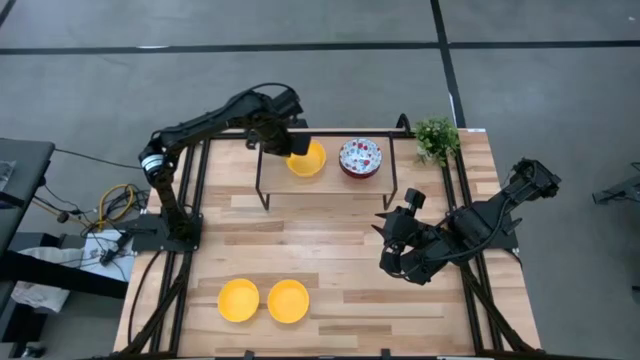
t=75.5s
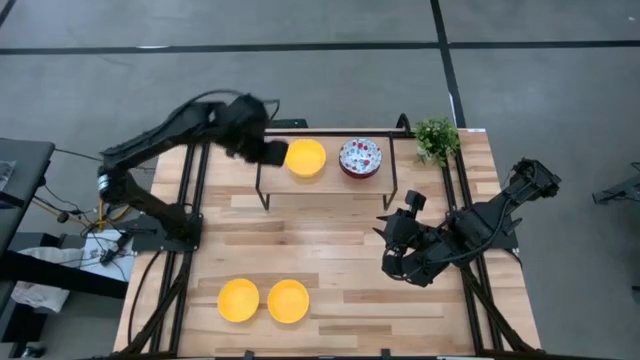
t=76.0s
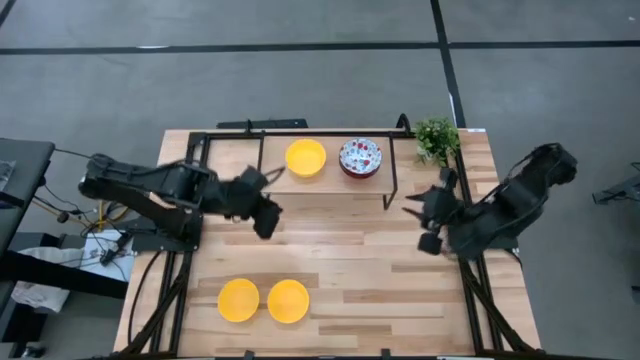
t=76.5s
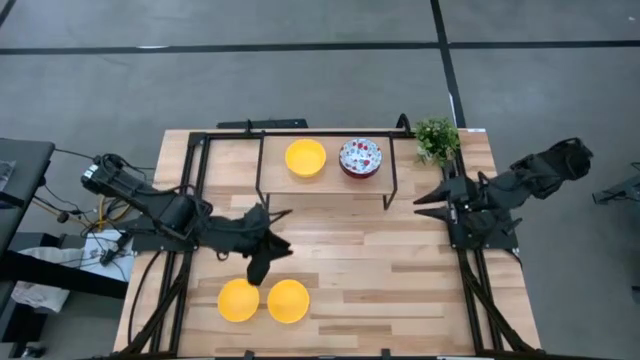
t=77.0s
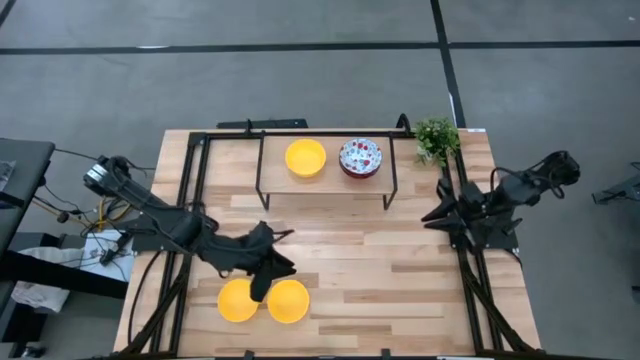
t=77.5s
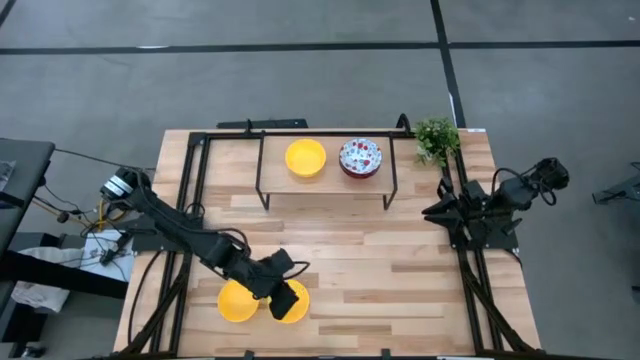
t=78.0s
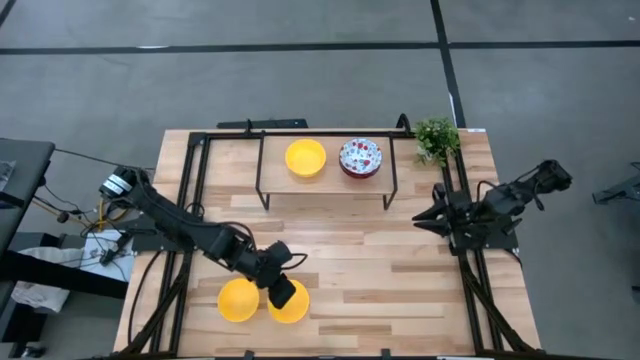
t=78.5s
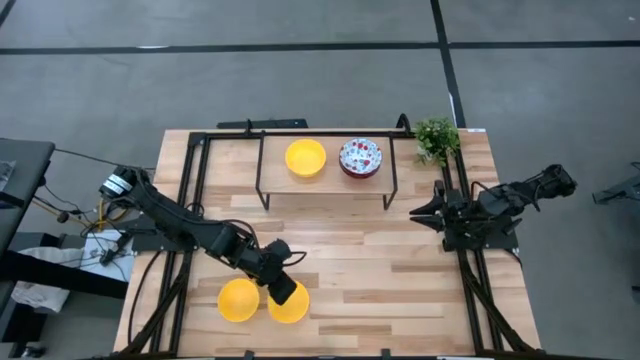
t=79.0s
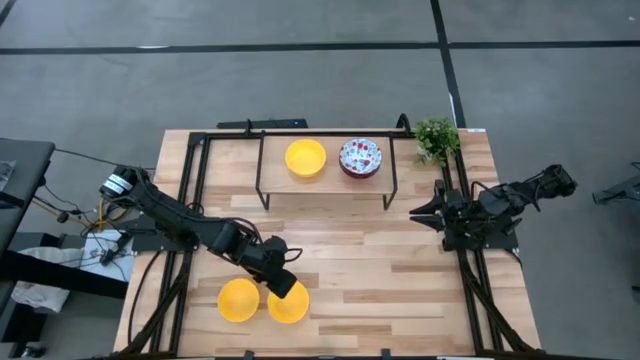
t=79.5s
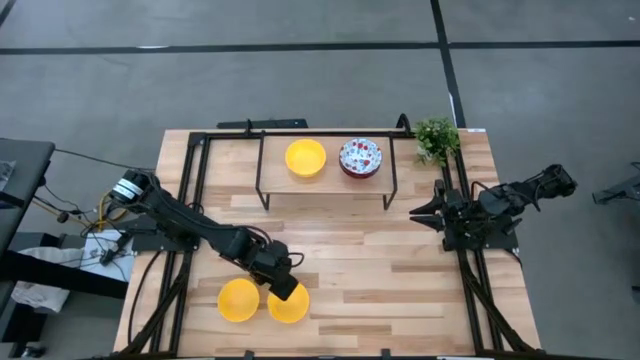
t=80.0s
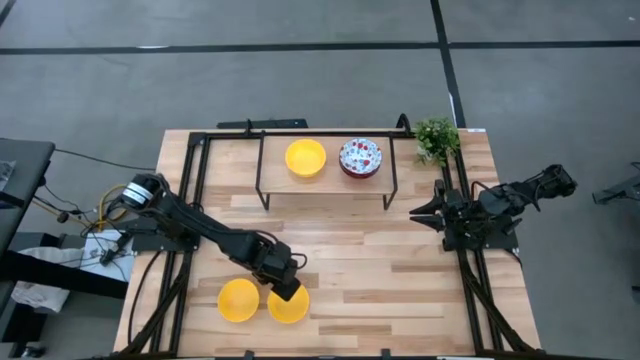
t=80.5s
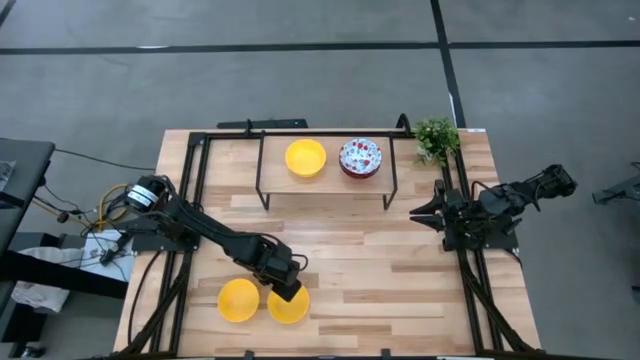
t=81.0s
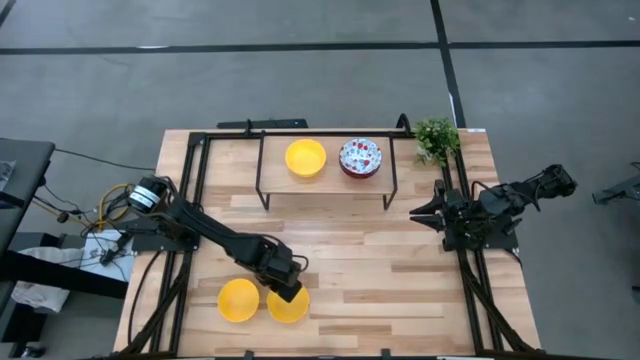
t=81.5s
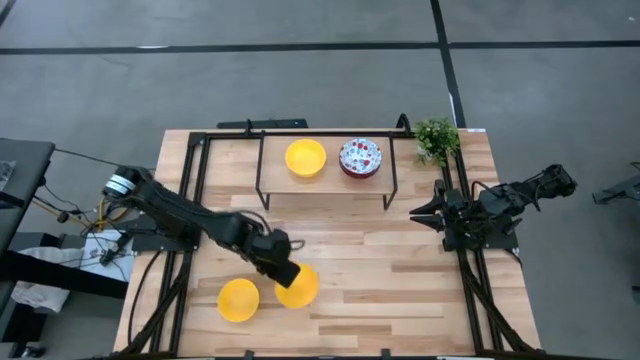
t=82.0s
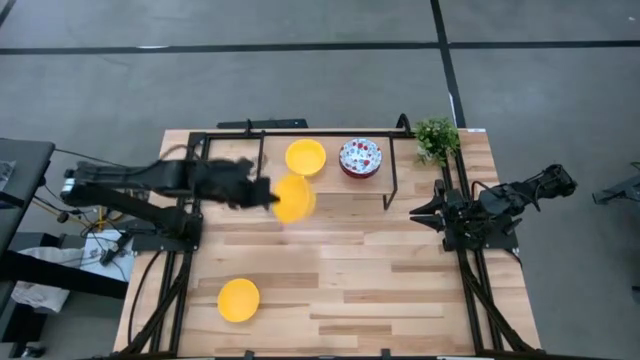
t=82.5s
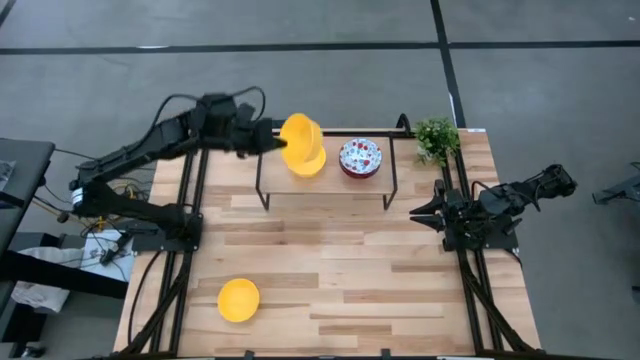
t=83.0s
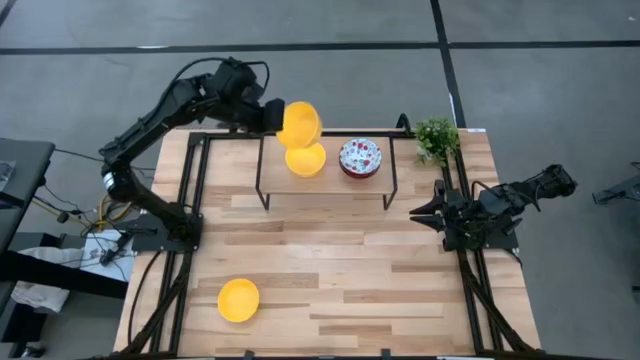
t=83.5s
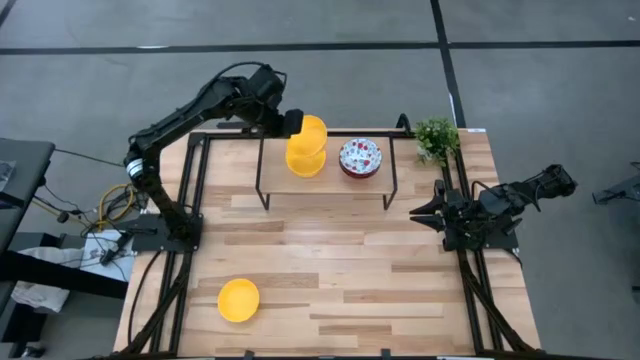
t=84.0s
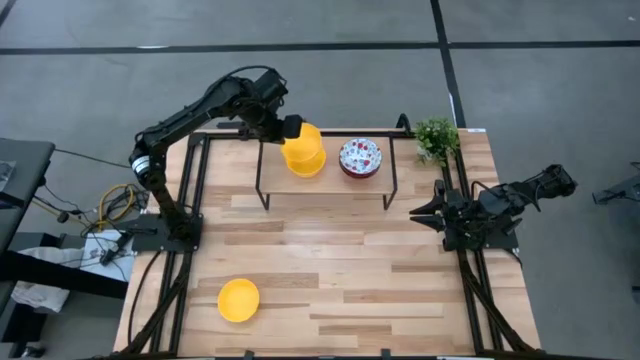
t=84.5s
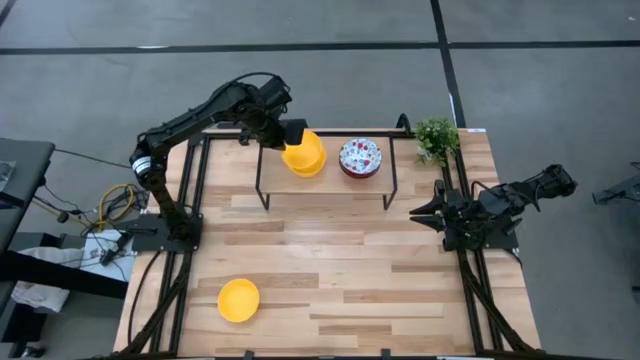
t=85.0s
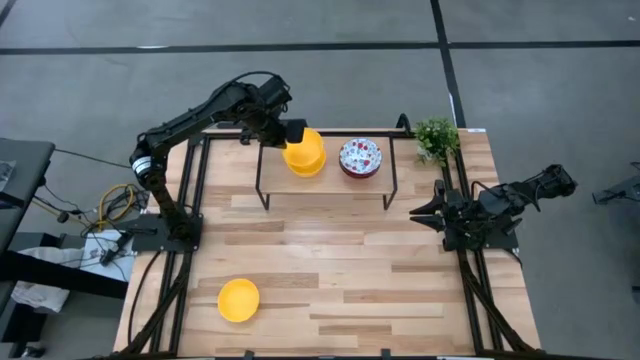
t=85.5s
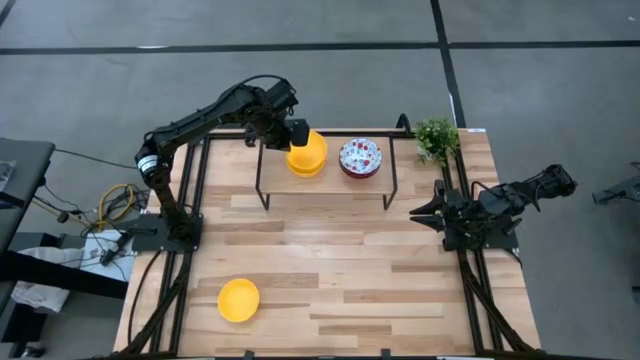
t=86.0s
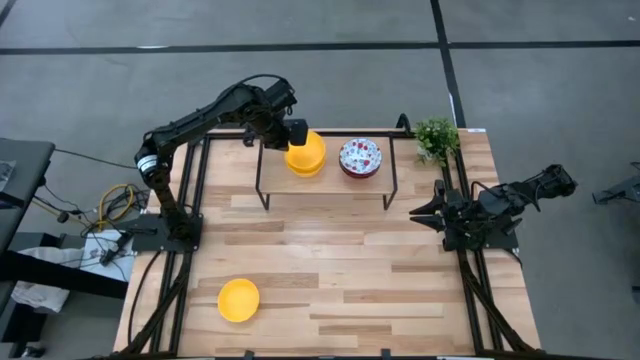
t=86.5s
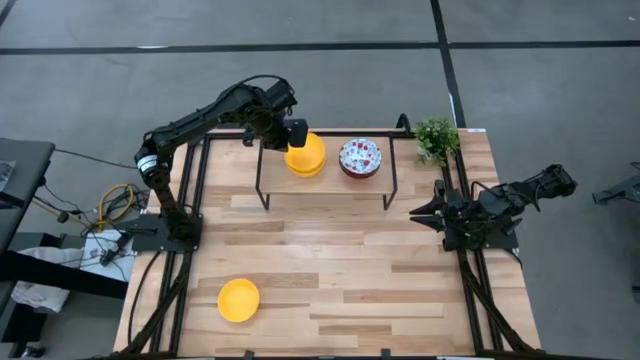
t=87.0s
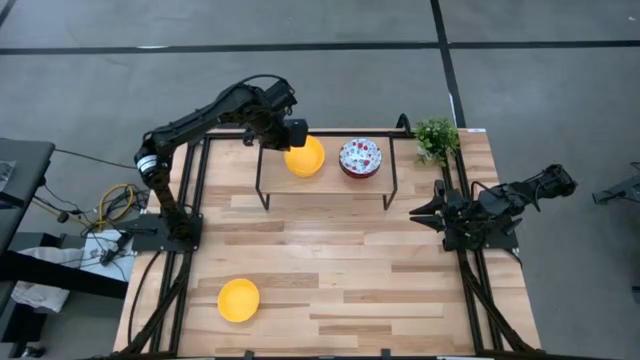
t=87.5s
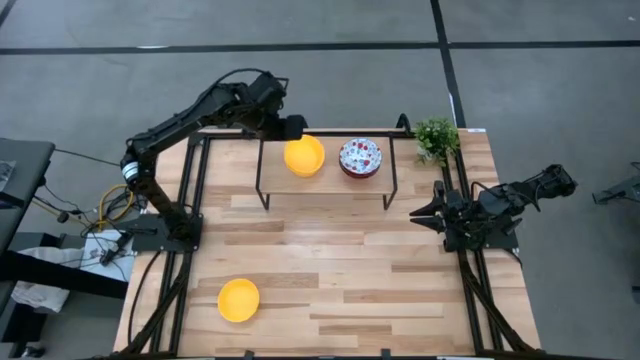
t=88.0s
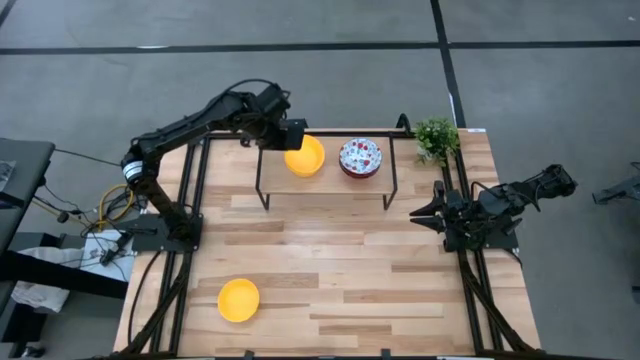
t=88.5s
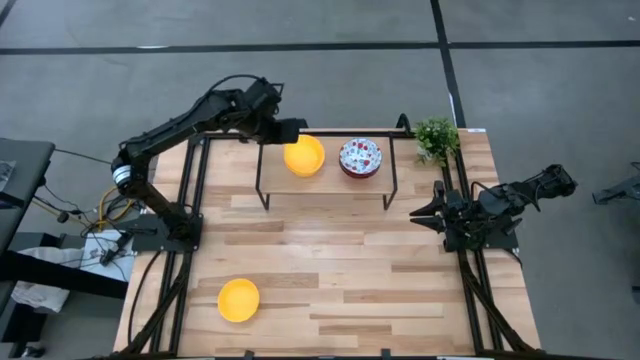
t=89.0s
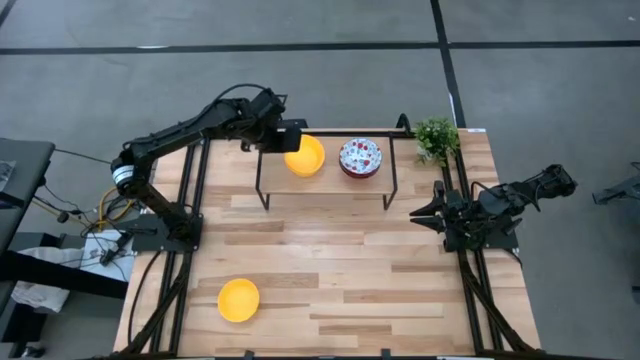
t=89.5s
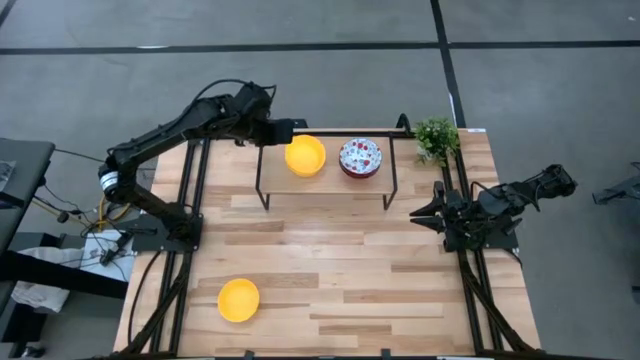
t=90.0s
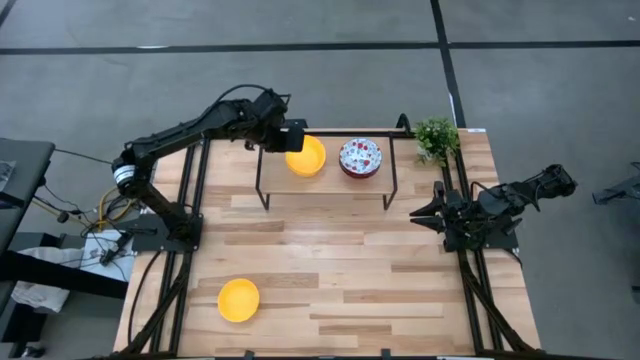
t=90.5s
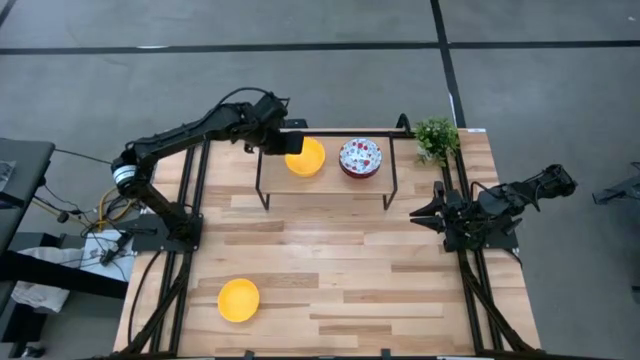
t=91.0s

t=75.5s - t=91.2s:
Task: Pick & Place Mini bowls
Stack the right yellow bowl on the yellow bowl on the shelf
